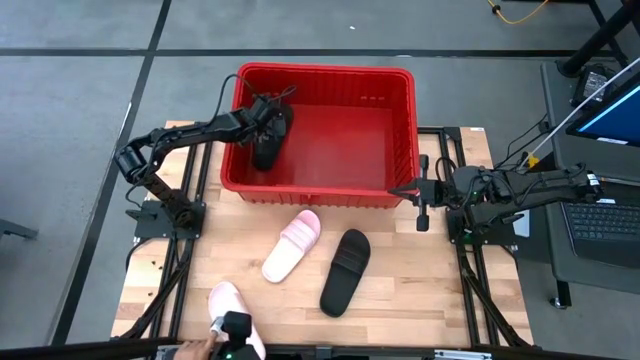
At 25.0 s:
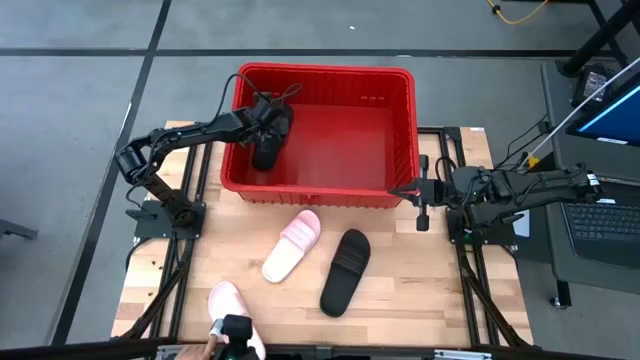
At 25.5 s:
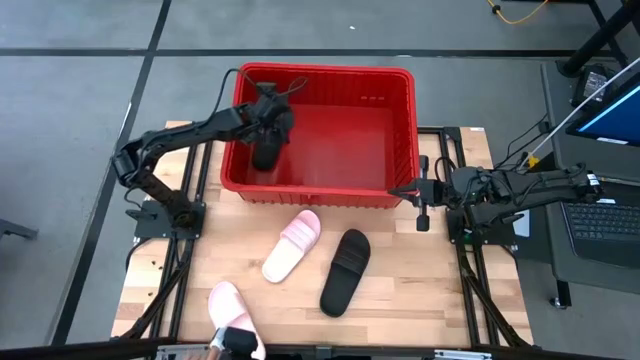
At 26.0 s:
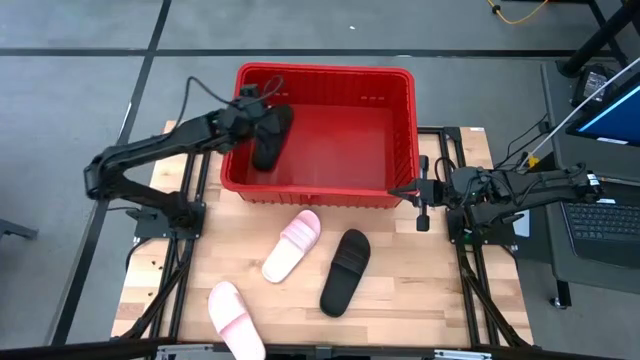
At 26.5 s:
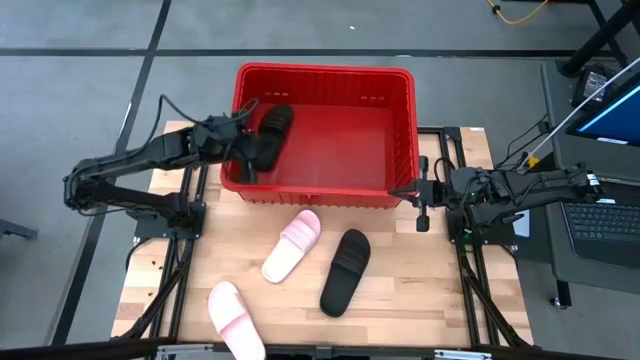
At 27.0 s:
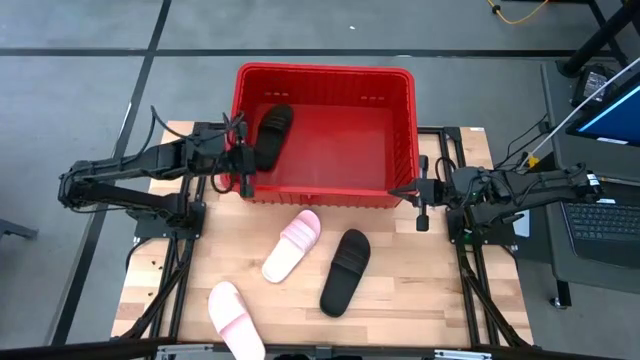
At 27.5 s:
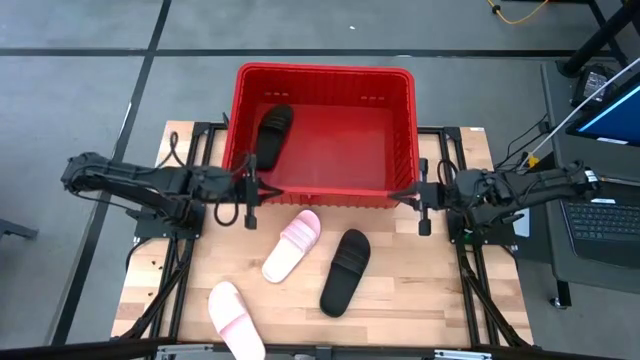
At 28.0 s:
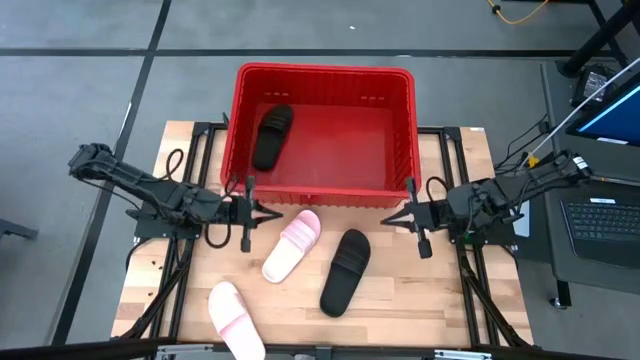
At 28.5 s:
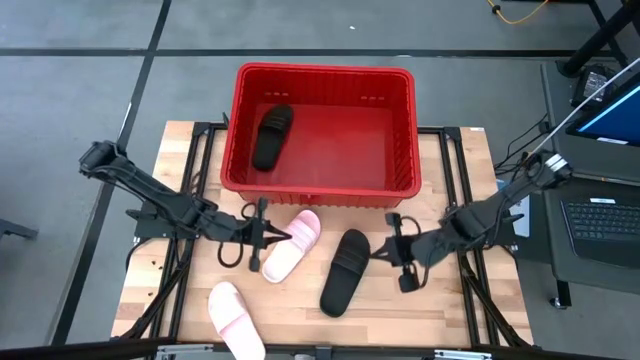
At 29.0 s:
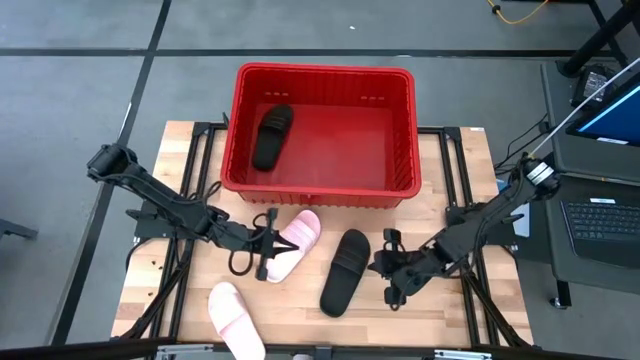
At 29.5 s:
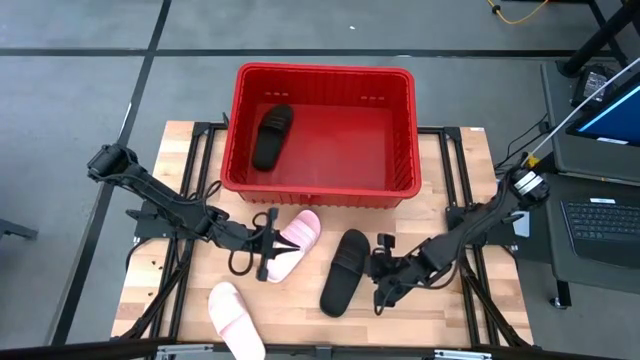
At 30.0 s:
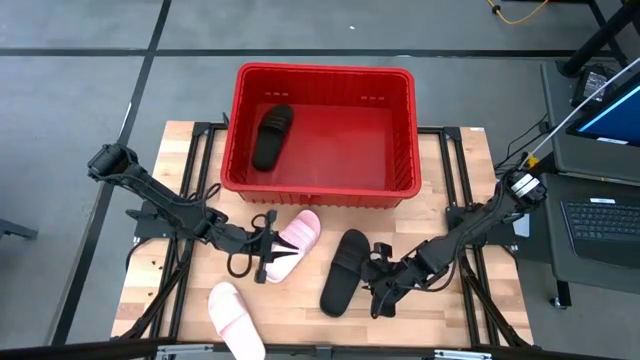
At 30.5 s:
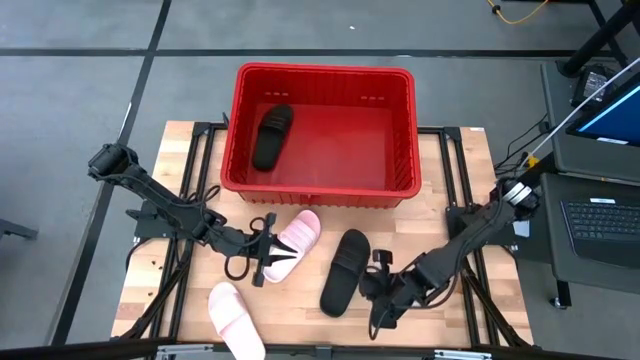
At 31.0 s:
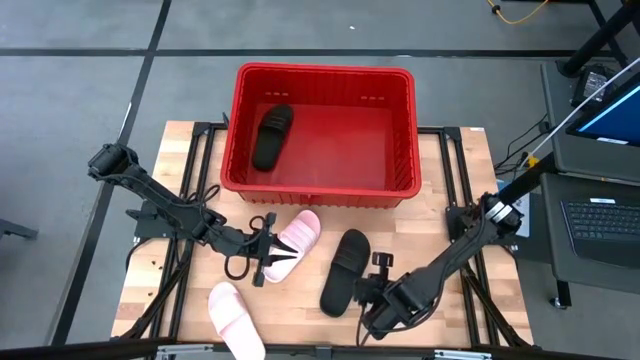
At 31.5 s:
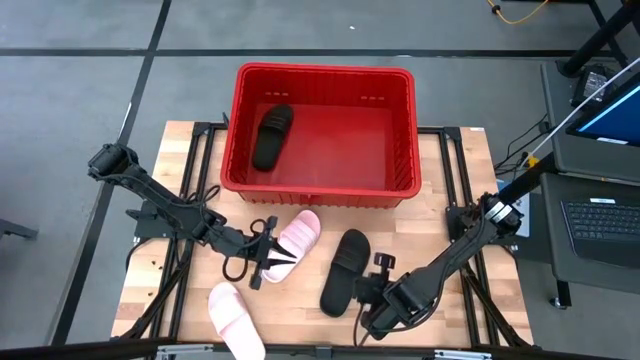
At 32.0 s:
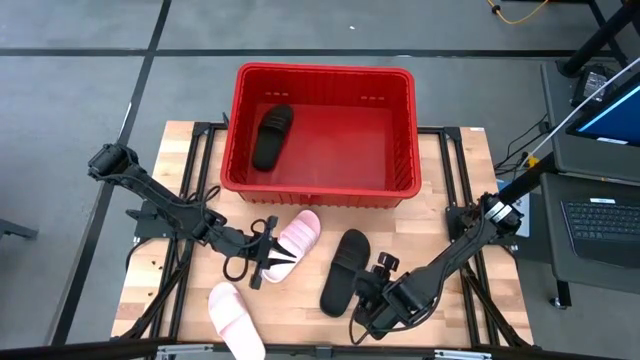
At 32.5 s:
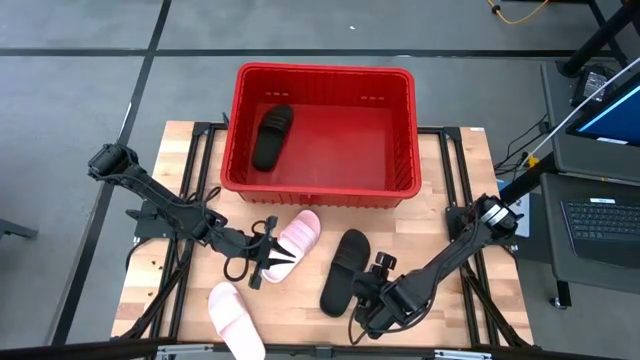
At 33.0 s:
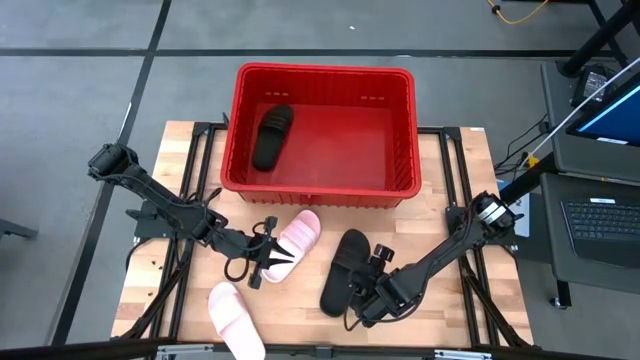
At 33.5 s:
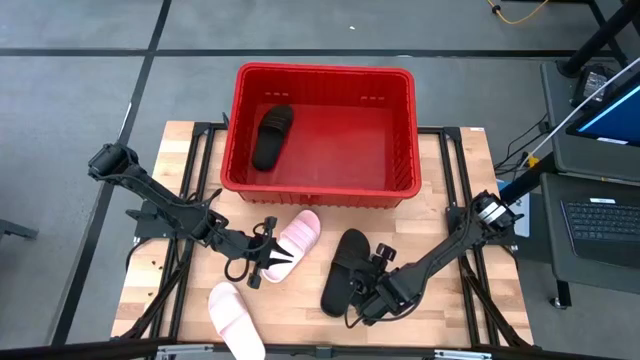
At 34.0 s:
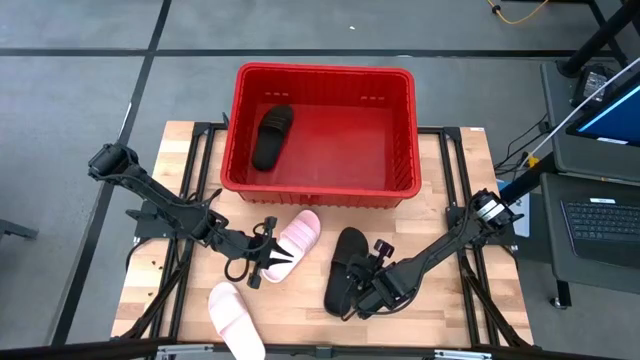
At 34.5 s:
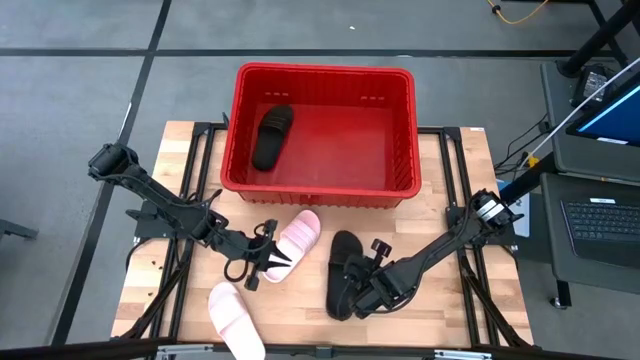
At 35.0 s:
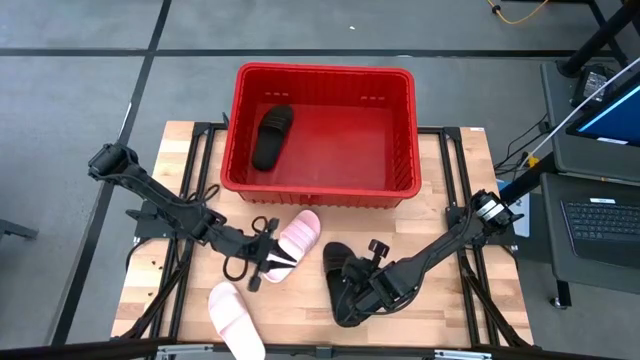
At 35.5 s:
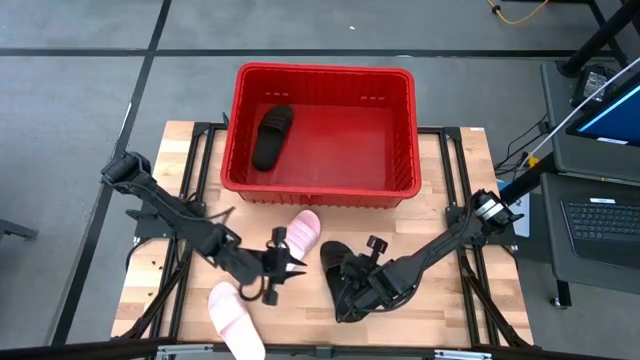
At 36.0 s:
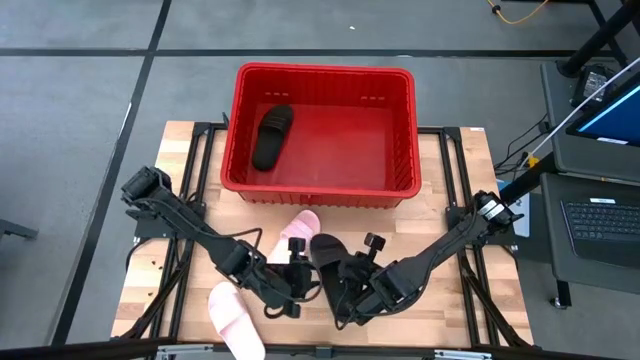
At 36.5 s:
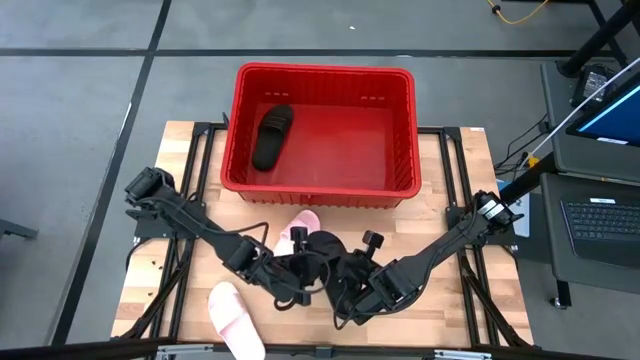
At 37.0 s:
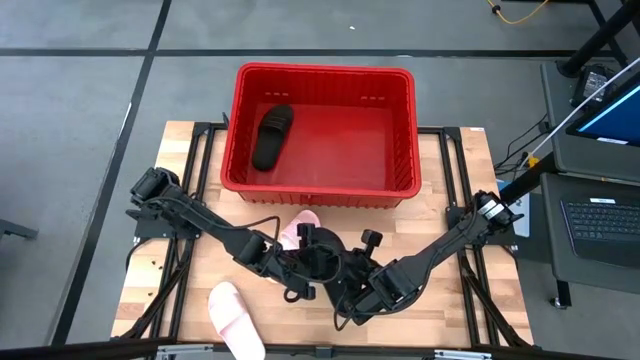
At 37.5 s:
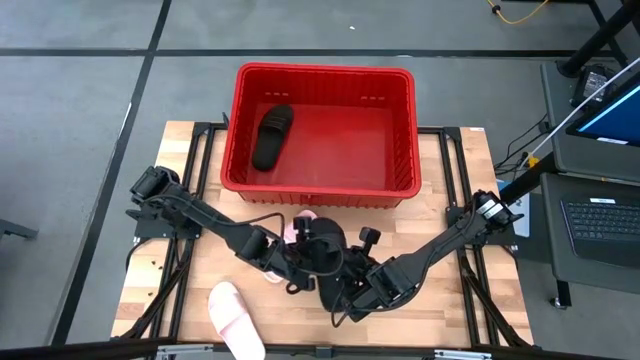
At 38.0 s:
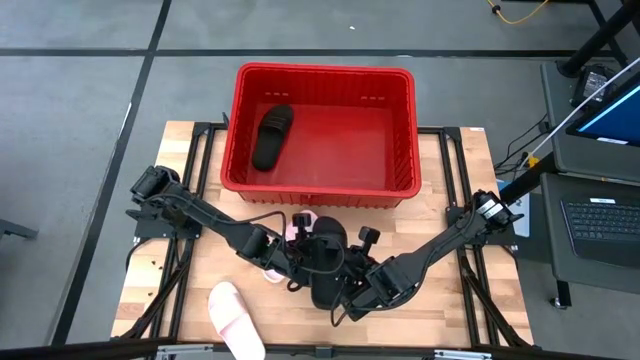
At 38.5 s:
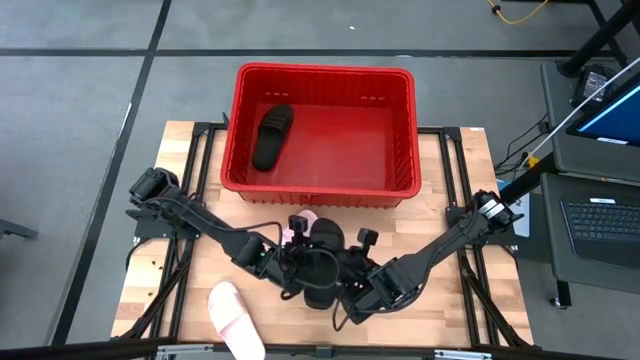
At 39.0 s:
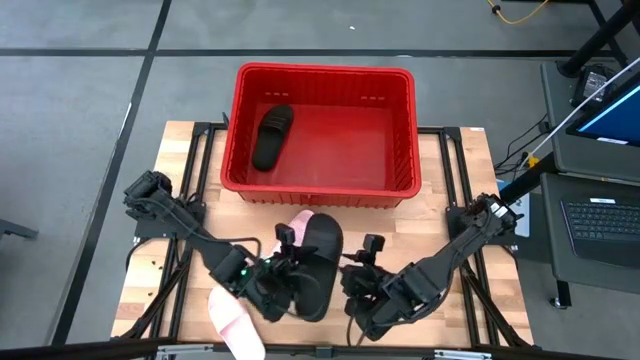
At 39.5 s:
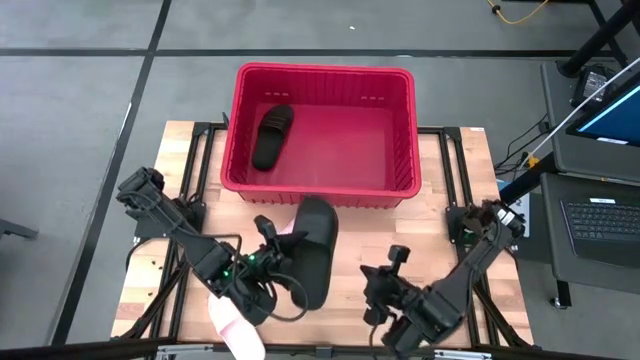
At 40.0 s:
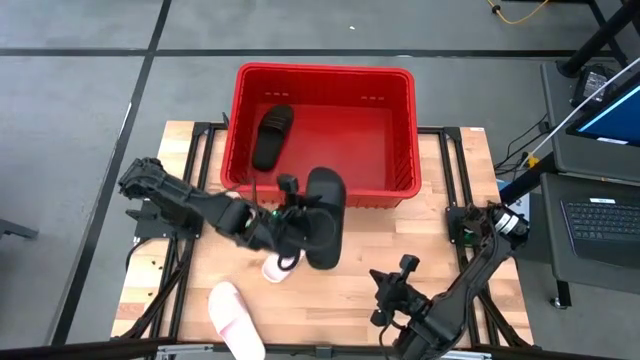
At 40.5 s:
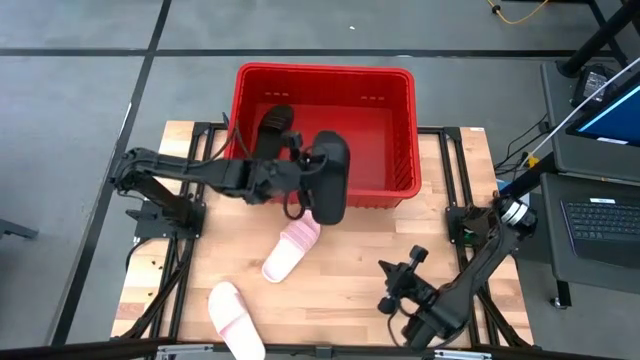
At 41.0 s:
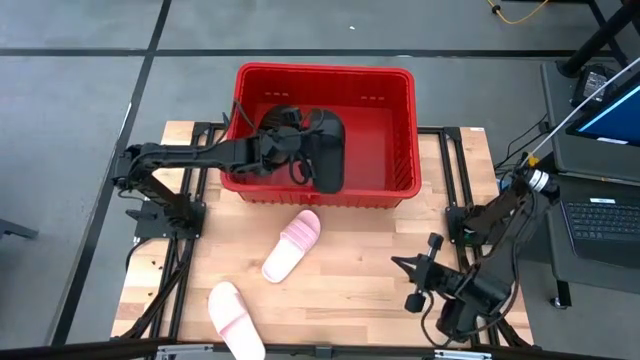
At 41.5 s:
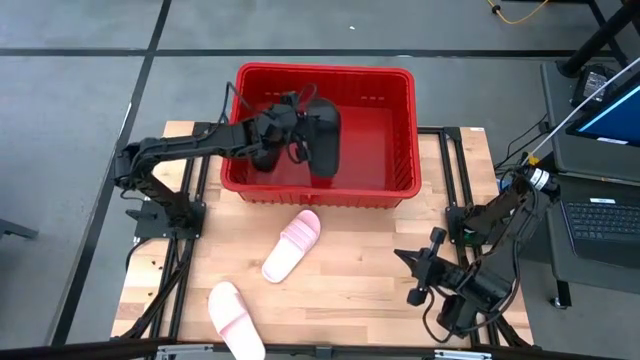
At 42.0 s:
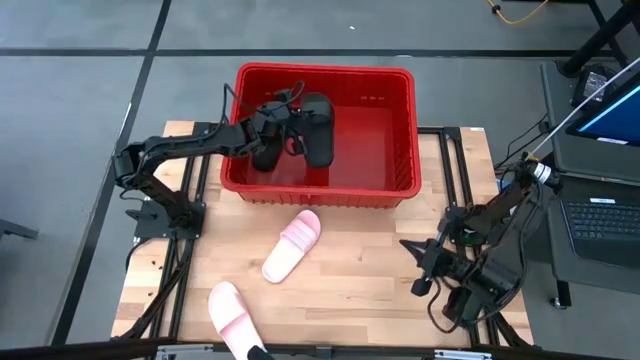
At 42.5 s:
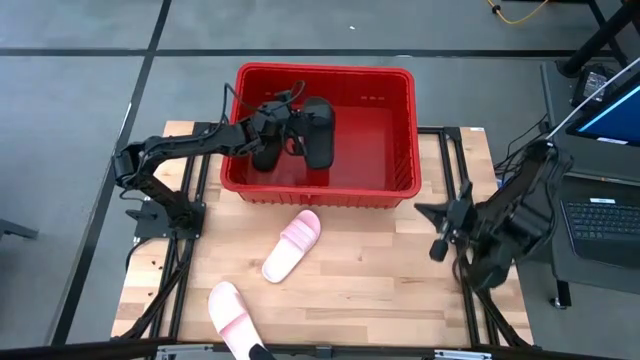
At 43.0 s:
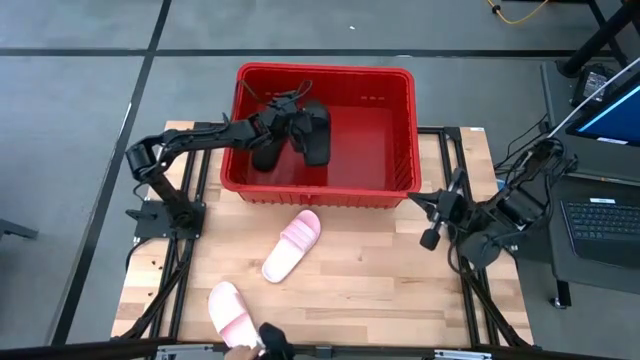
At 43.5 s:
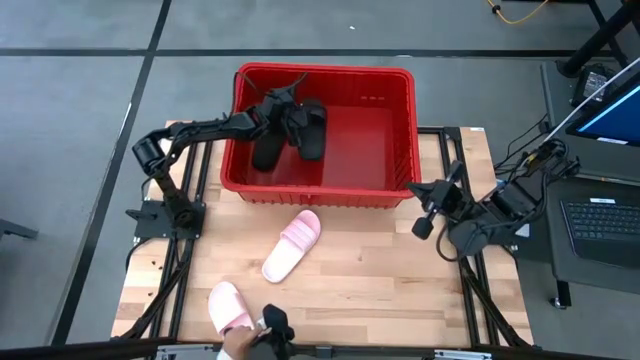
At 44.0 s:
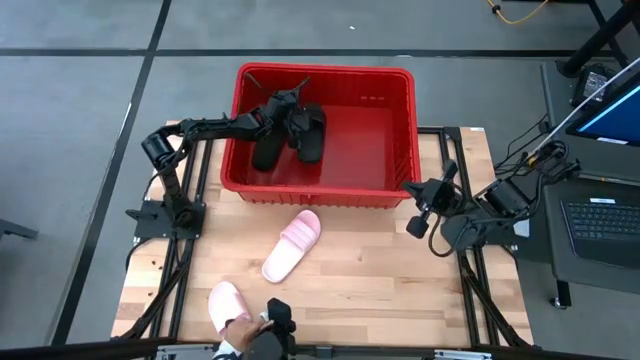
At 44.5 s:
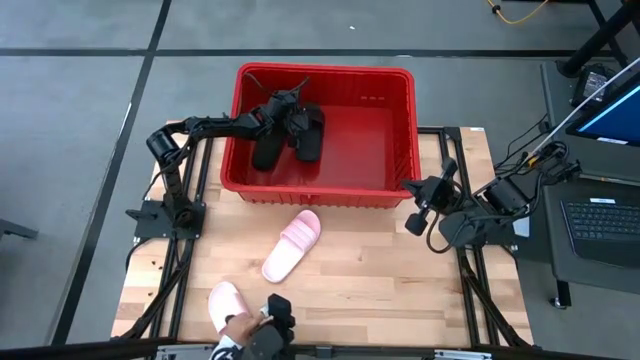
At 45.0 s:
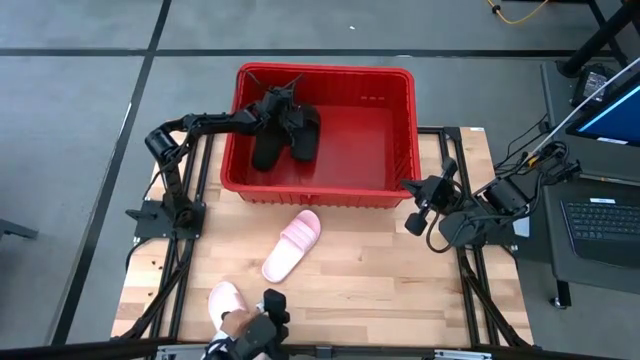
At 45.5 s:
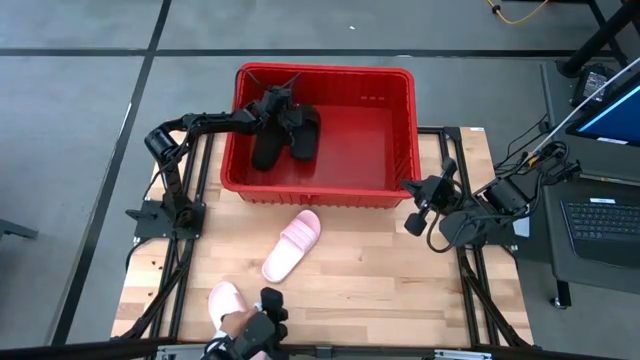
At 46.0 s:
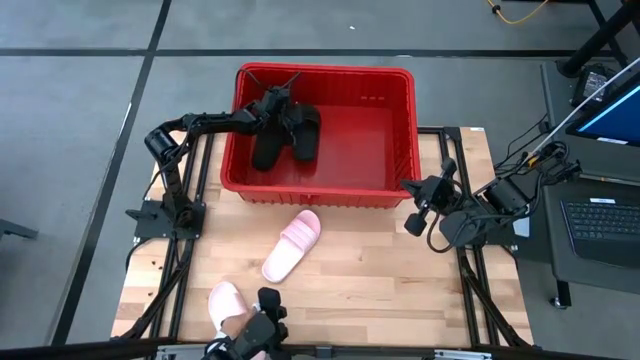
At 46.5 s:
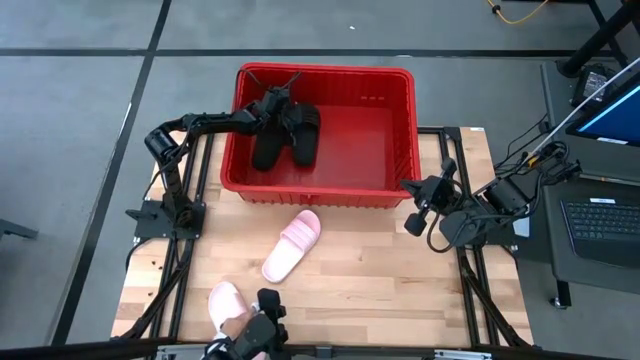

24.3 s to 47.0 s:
Task: Pick and place slides into bin
Put the black slipper into the red bin
